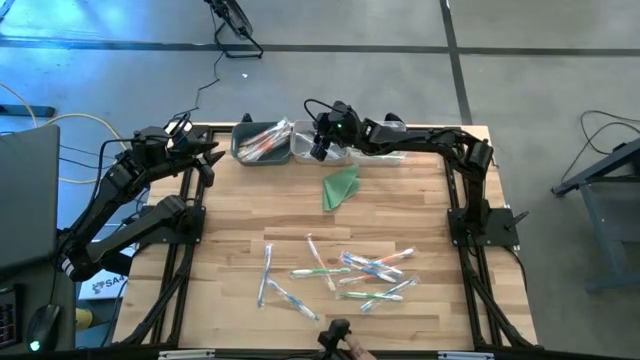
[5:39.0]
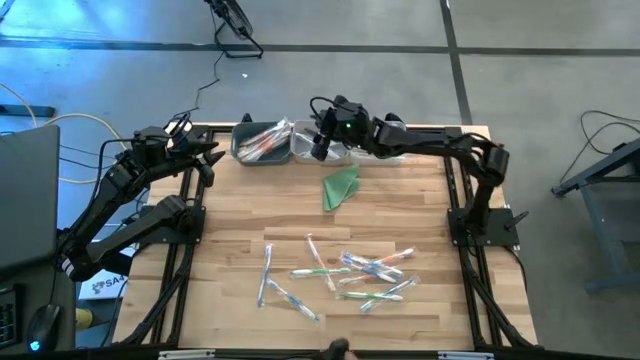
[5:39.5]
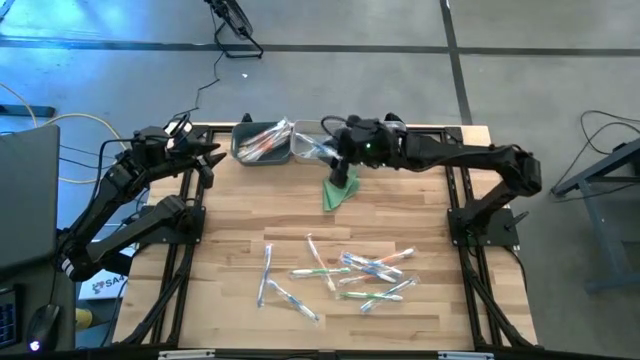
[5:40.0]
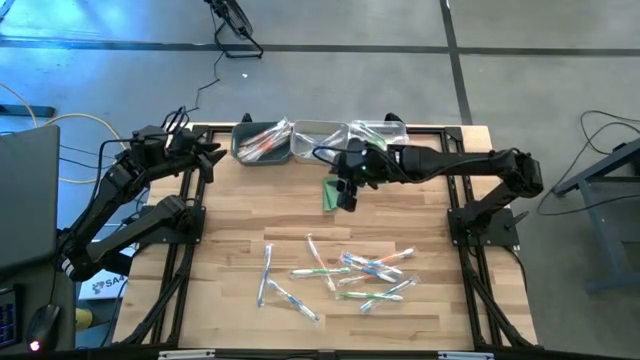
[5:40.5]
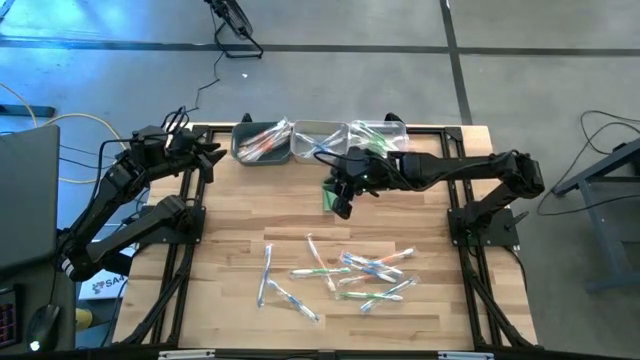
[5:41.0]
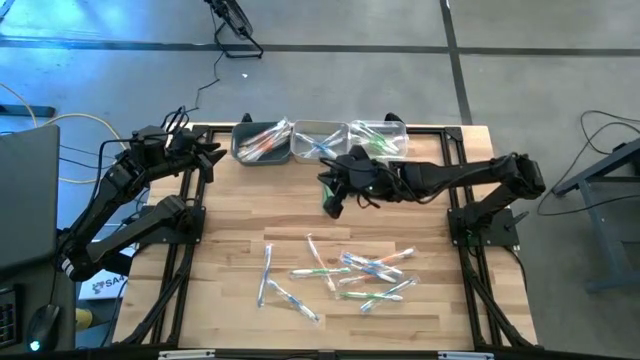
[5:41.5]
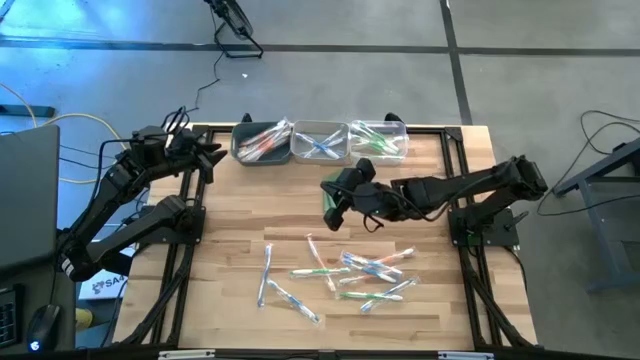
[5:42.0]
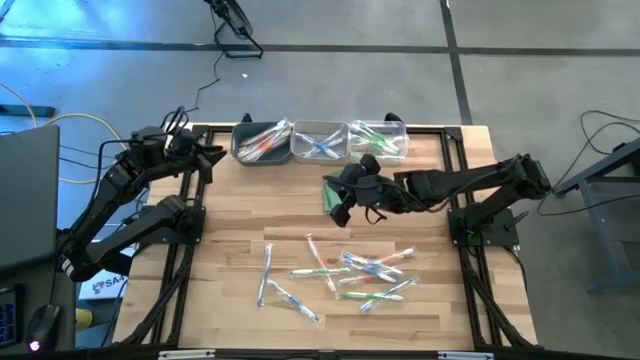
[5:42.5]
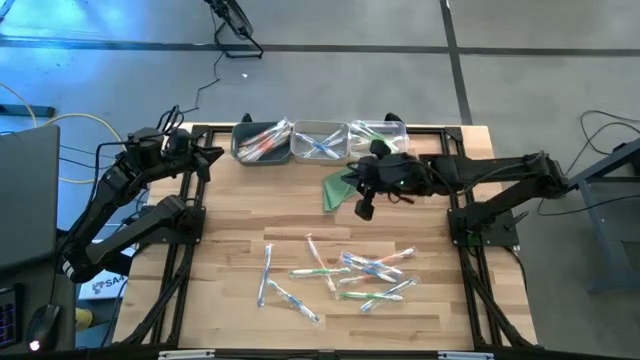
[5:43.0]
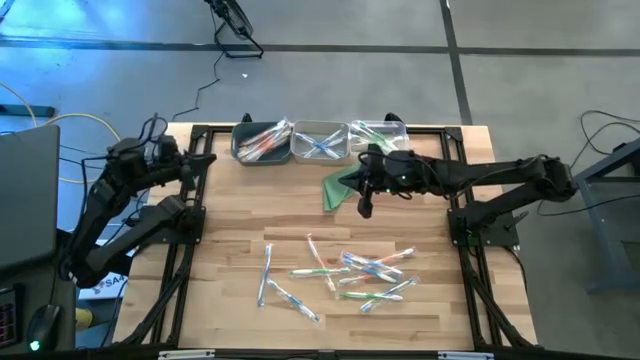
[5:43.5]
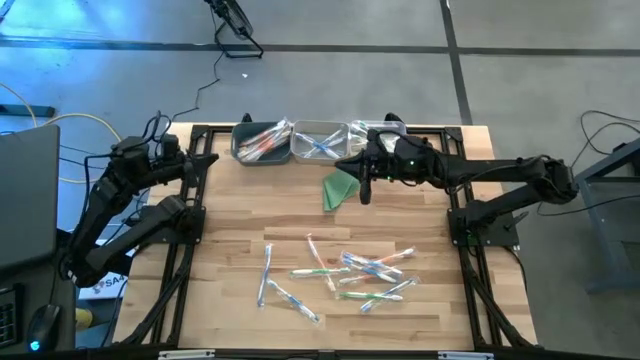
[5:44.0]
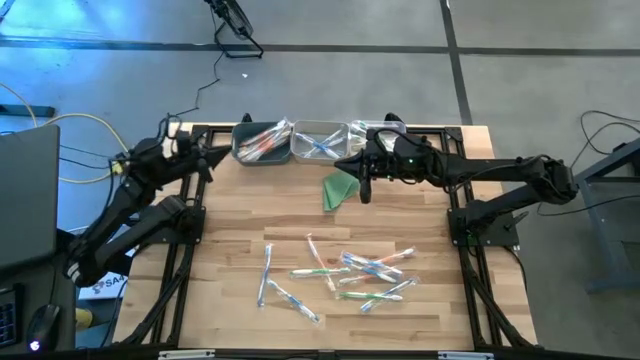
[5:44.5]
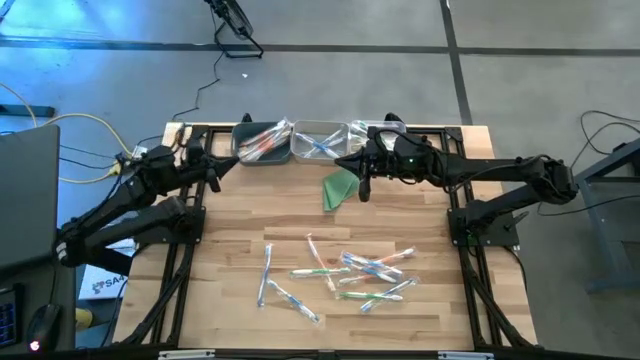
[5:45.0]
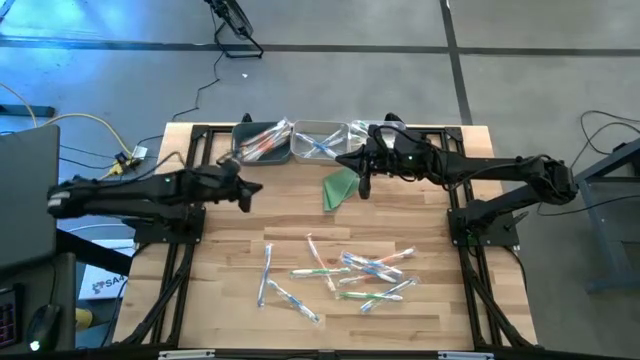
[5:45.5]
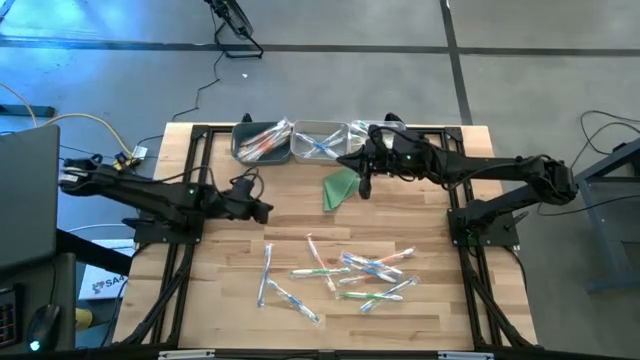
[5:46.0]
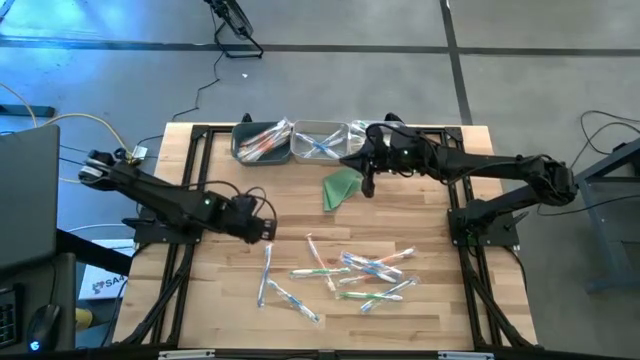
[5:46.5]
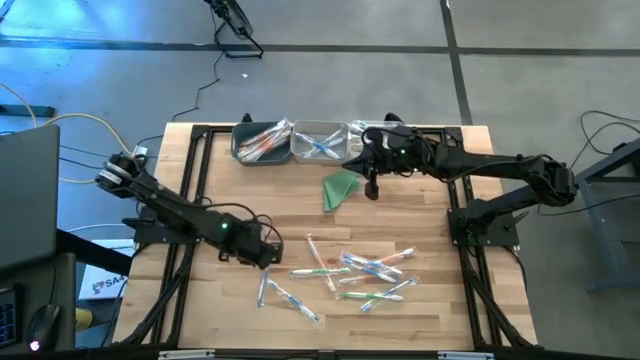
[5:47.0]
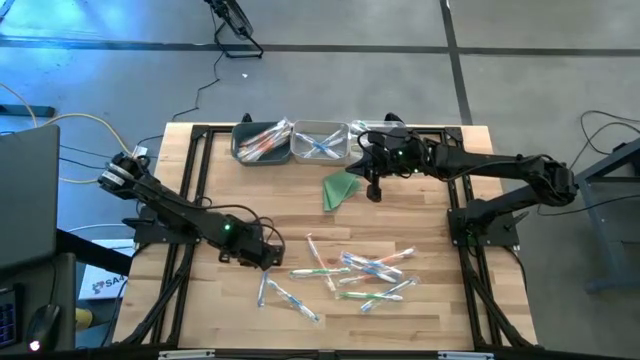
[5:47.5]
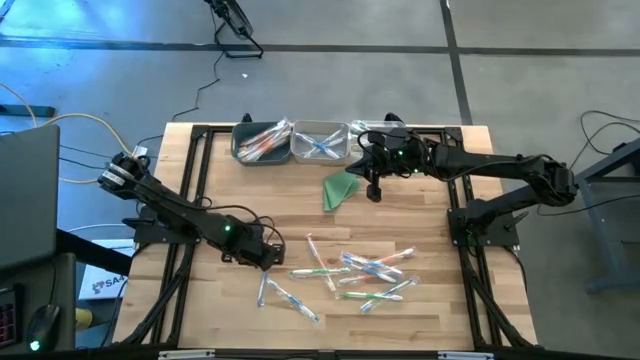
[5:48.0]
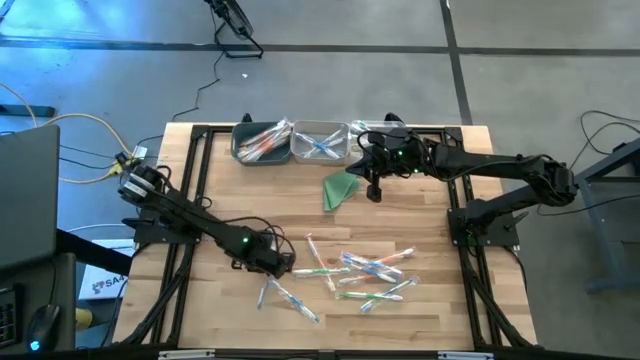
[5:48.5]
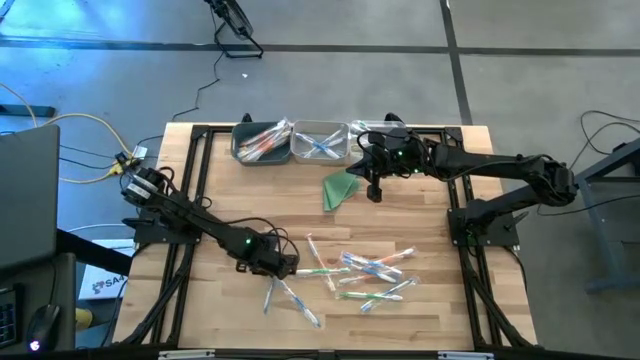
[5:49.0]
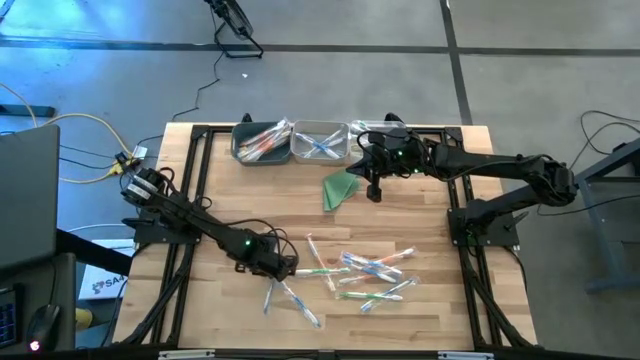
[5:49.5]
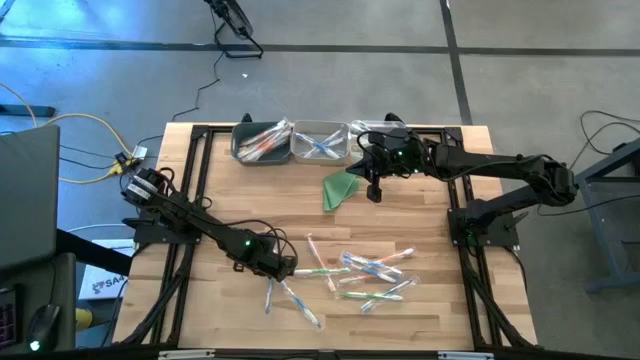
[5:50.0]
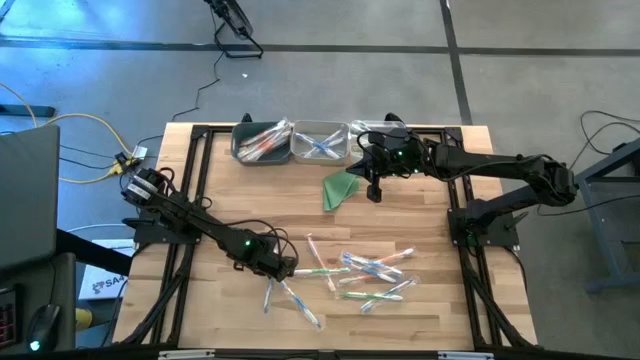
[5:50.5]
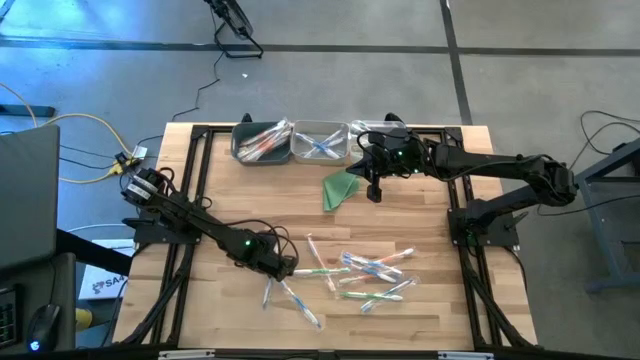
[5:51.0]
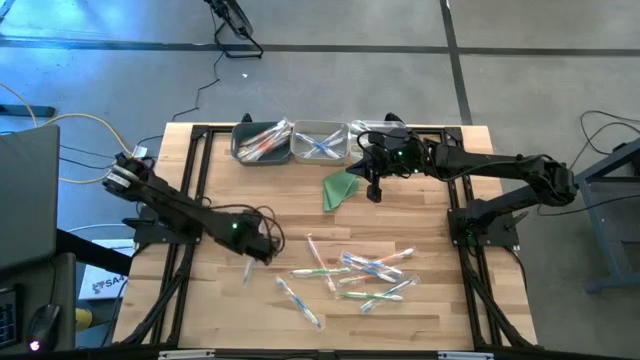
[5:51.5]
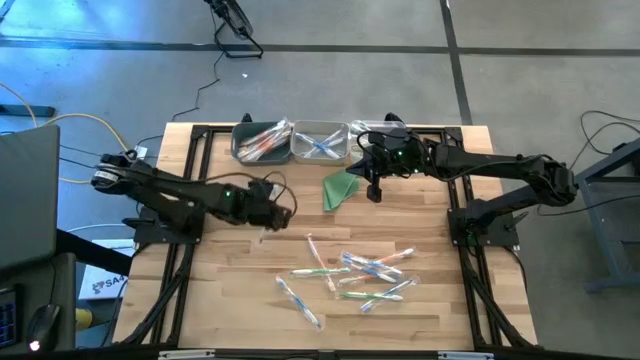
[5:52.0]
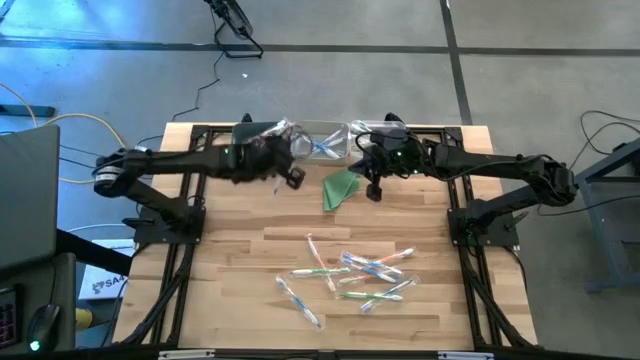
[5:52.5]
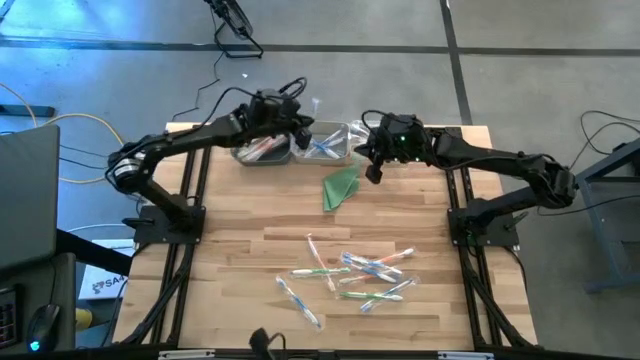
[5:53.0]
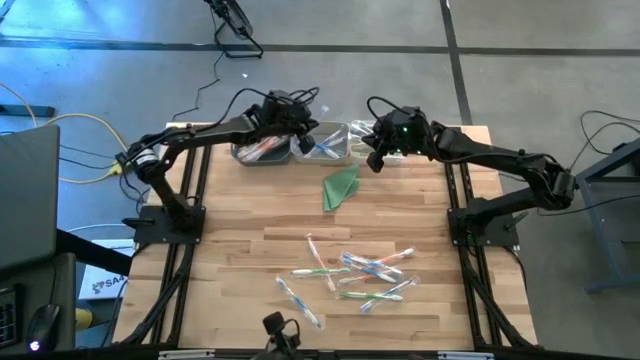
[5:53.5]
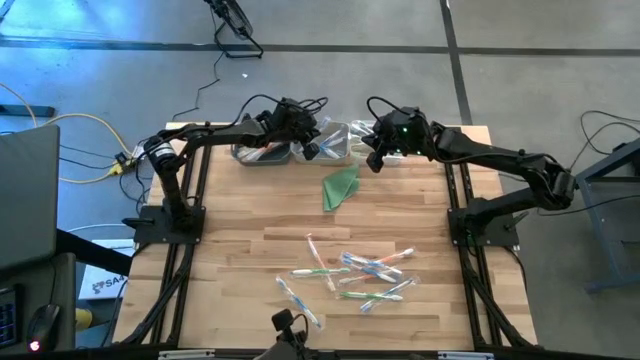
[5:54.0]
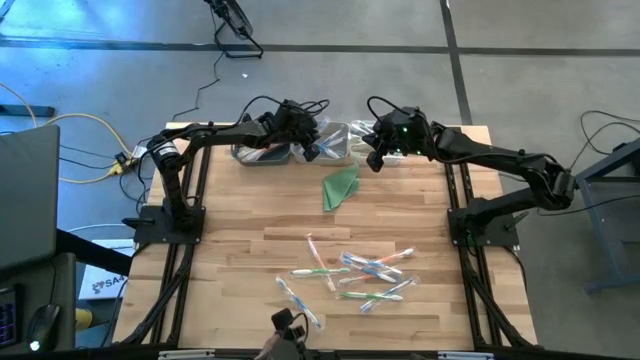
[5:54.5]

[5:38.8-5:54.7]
Task: Pick & Place Toothbrushes
Put the blue toothbrush into the gray bin

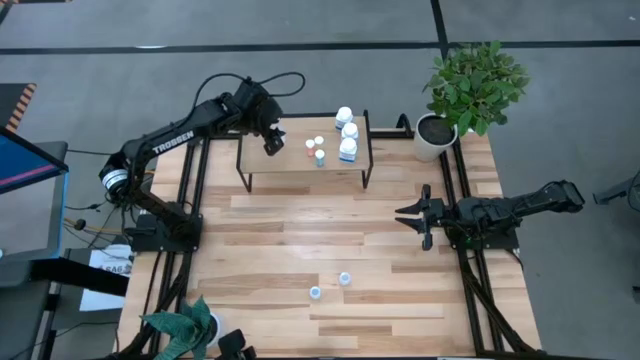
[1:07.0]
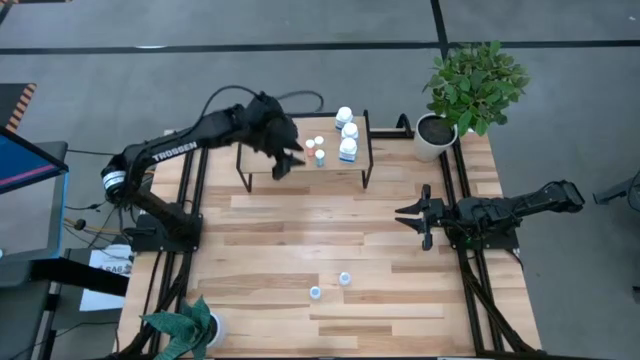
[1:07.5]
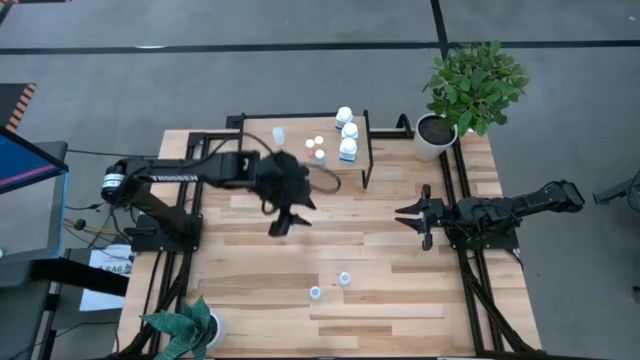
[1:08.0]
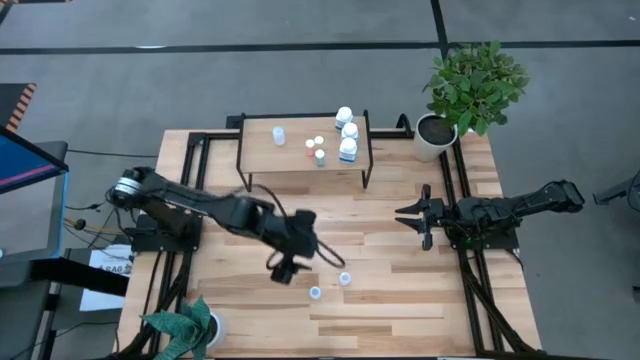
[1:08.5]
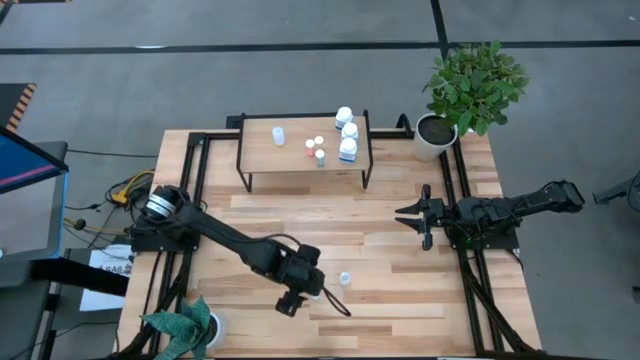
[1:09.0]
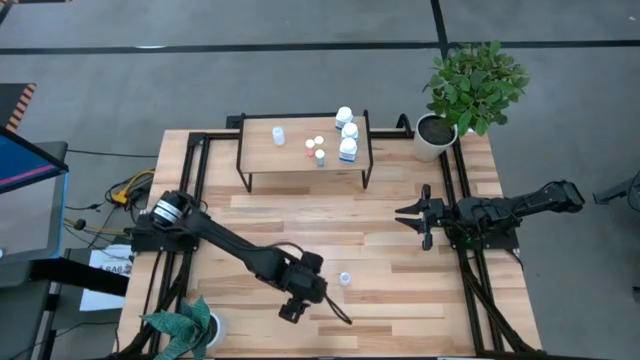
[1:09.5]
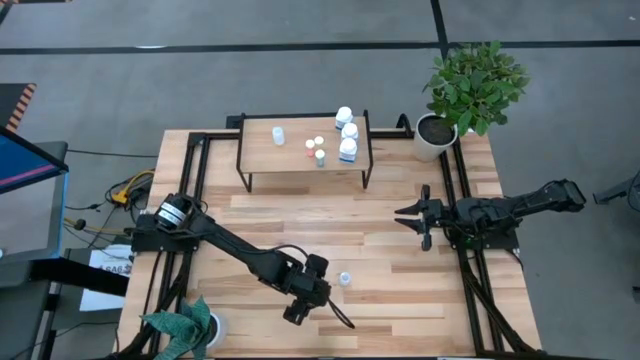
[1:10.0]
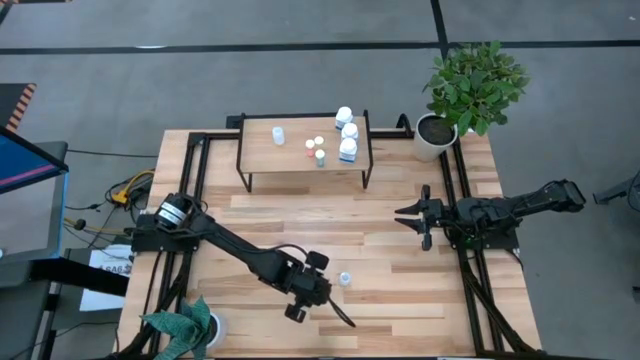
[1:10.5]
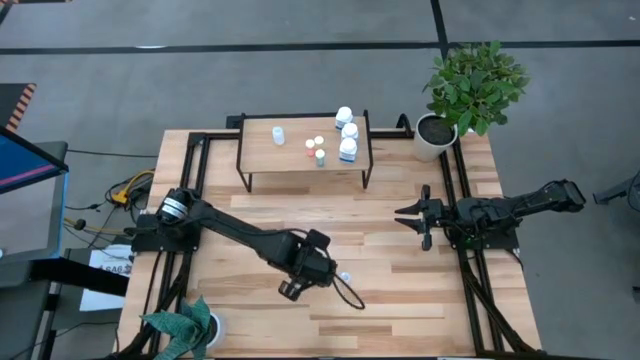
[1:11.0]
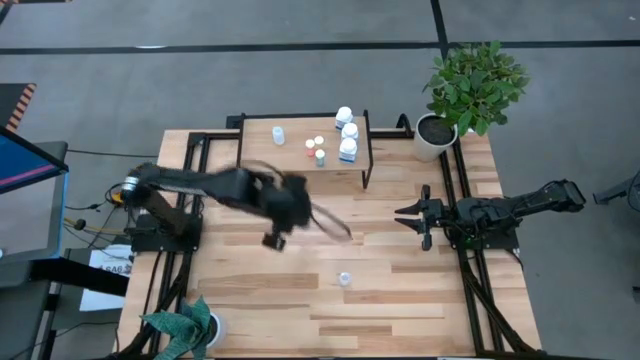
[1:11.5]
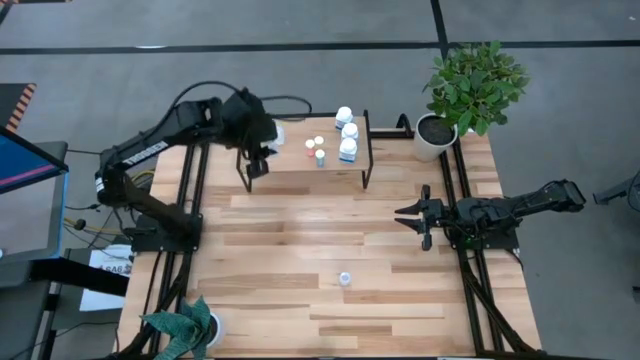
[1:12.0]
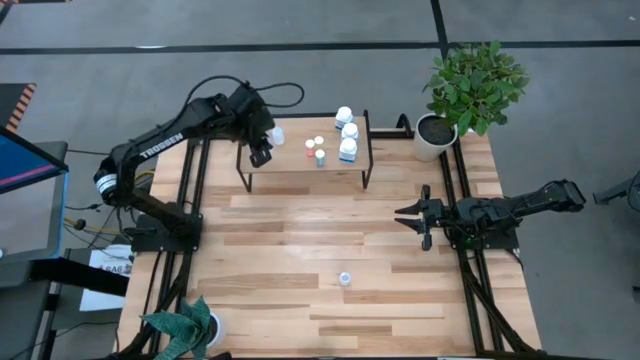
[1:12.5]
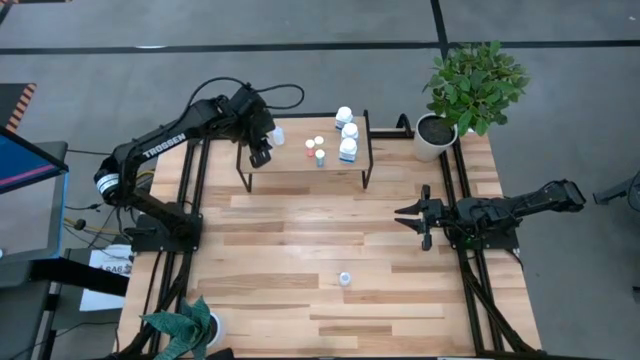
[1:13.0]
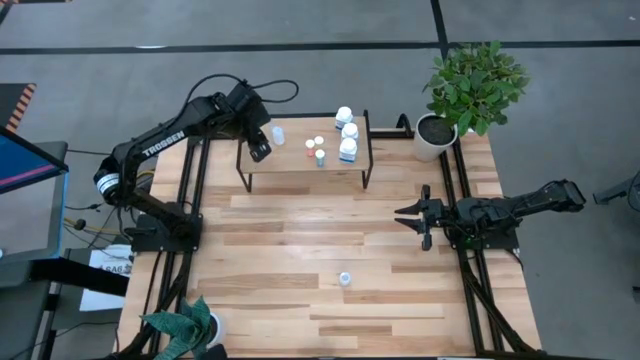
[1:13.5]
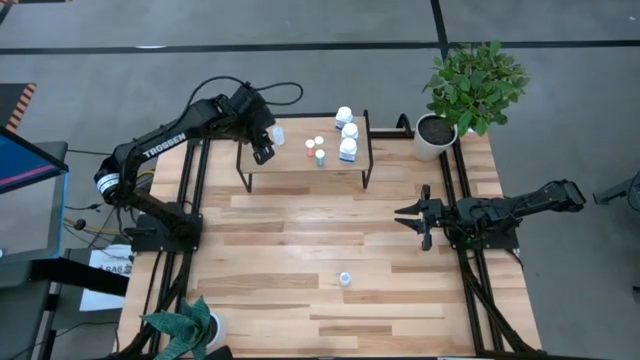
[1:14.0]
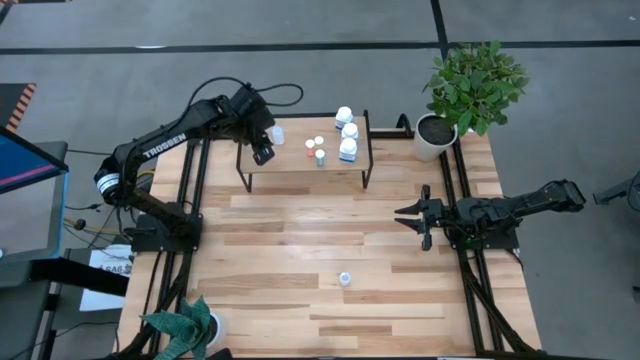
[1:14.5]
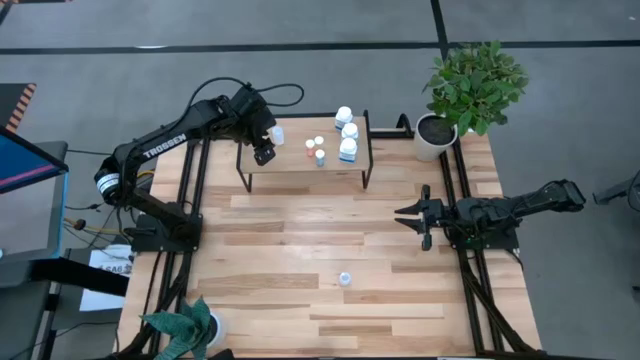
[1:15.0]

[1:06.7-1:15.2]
Task: Pick and place medicine bottles onto shelf by color
Put the left transparent pill bottle on the shelf
